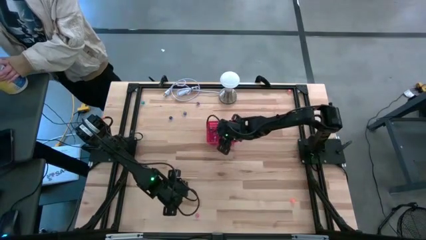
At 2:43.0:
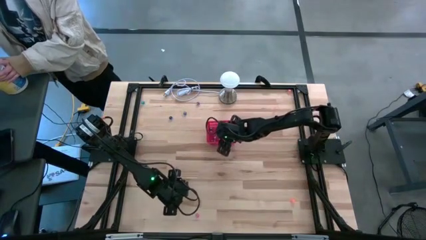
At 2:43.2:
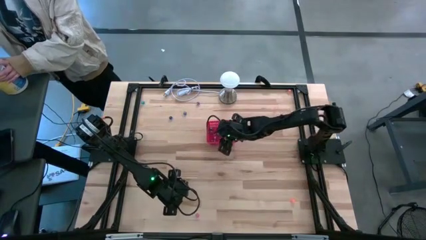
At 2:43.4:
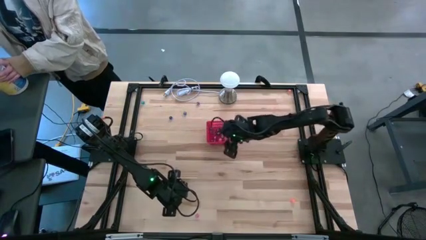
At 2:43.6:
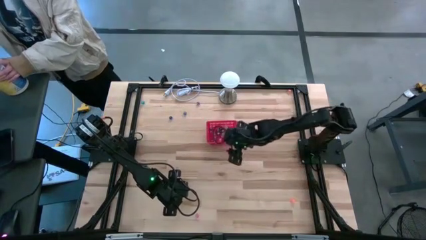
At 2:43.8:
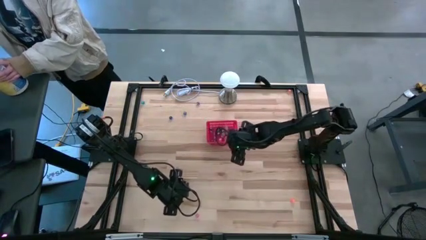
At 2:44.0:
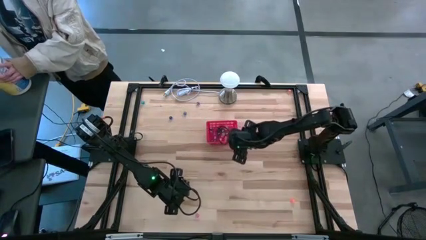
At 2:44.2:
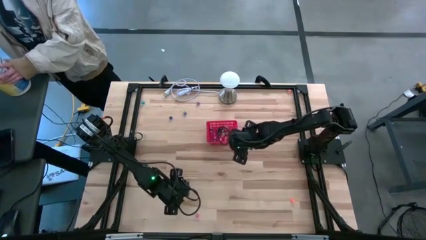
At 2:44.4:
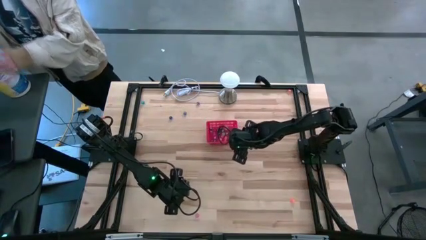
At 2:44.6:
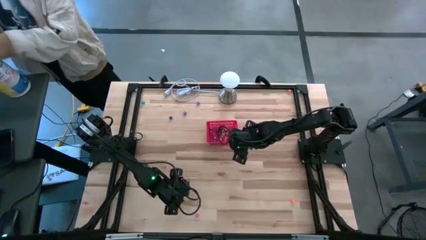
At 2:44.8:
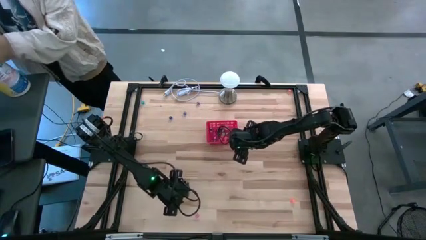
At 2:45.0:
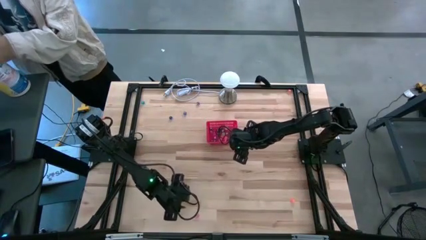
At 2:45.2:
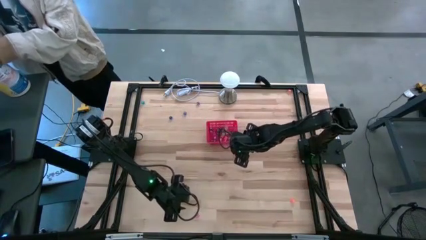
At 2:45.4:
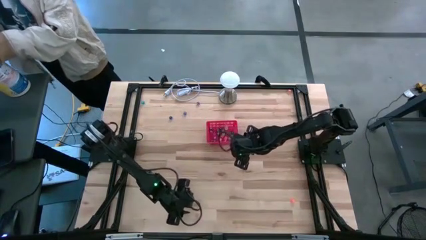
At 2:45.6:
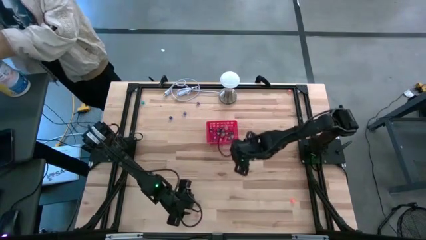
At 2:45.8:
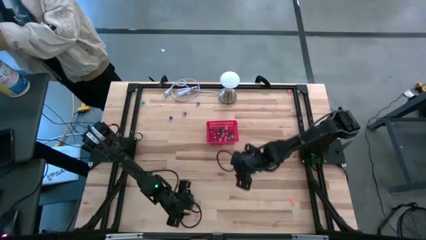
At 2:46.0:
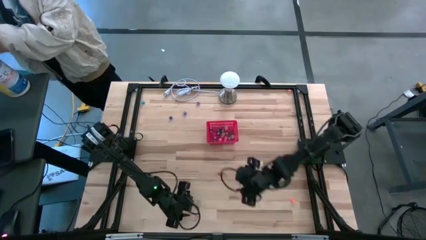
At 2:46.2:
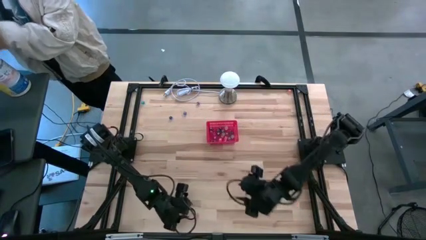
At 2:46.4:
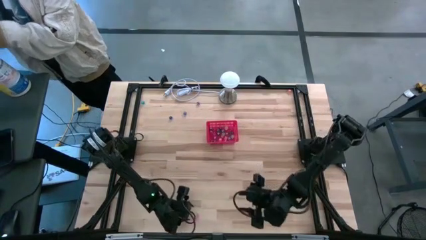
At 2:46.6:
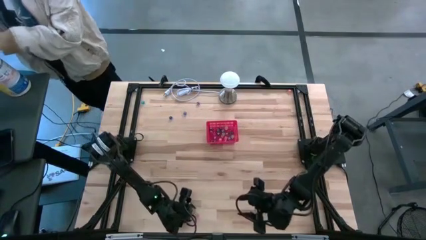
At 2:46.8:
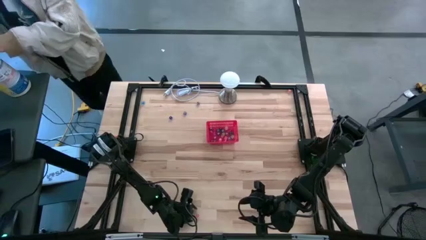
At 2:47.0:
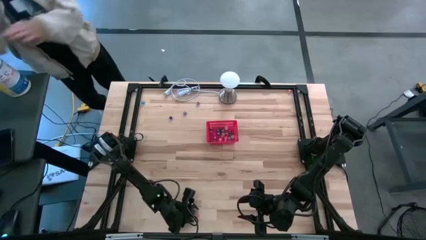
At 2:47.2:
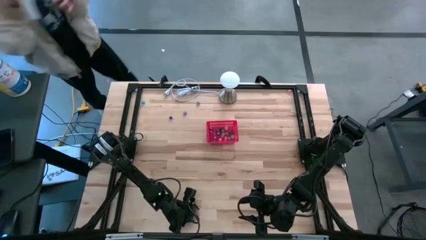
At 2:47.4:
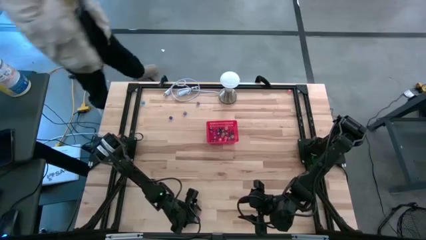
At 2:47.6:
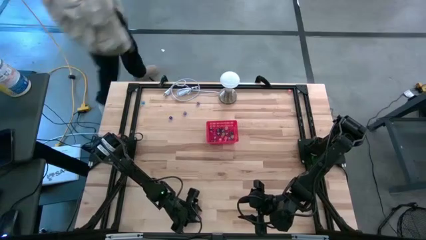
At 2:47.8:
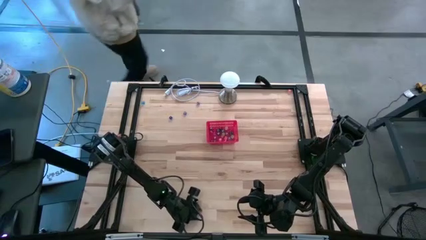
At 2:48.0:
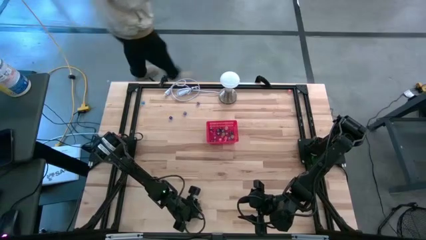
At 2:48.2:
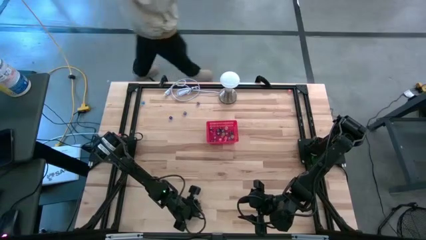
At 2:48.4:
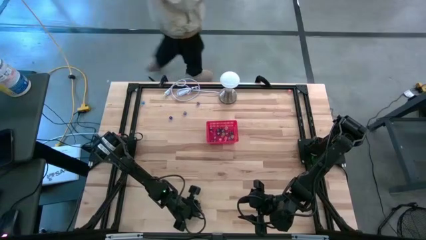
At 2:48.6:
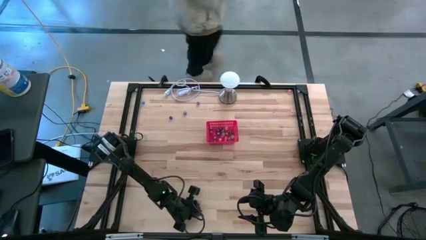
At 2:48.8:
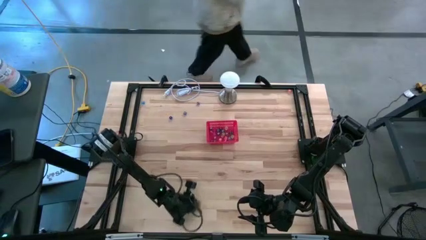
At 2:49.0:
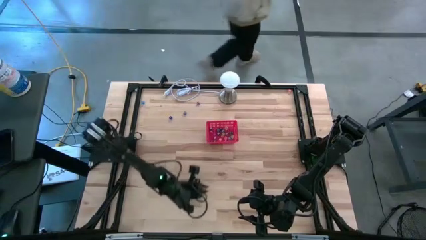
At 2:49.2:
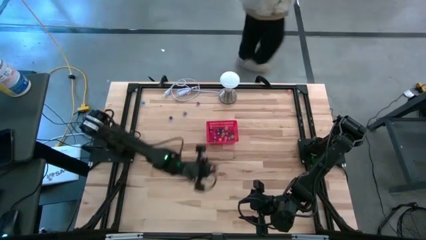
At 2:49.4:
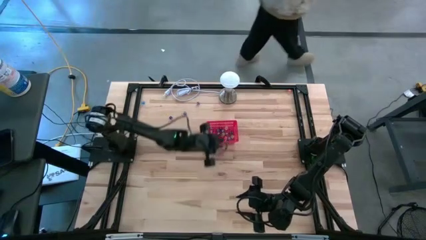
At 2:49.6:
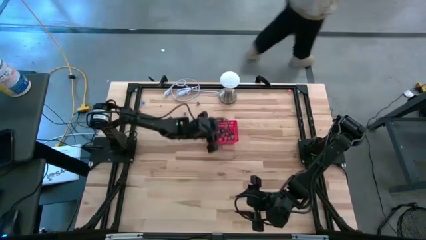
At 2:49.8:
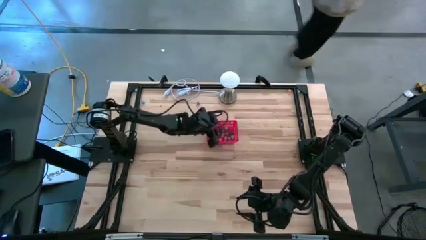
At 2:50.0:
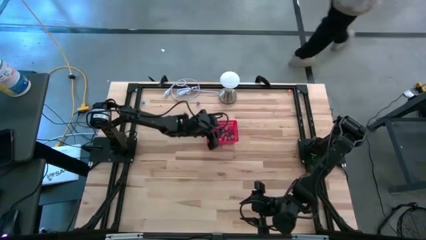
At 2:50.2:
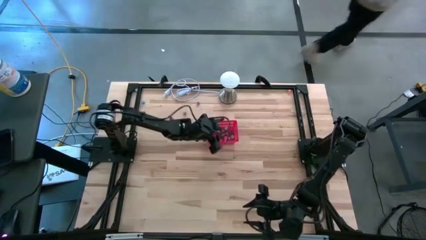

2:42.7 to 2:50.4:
Task: Pick & Place Dice
Put the pink dice into the bin

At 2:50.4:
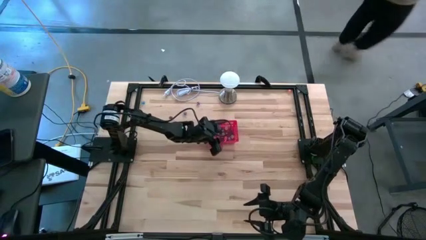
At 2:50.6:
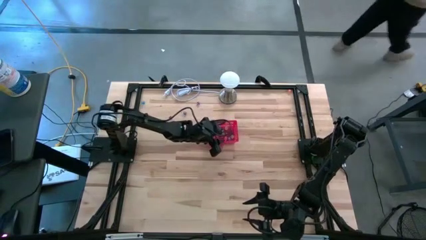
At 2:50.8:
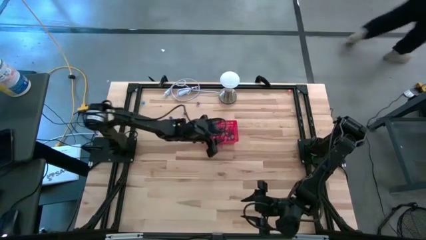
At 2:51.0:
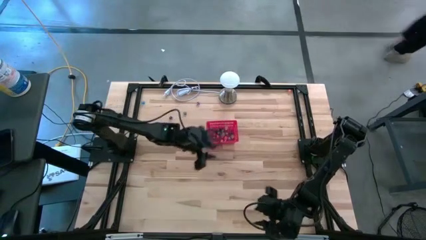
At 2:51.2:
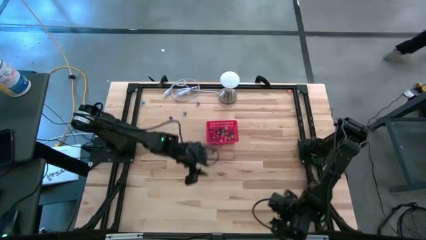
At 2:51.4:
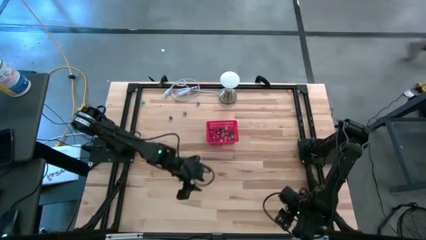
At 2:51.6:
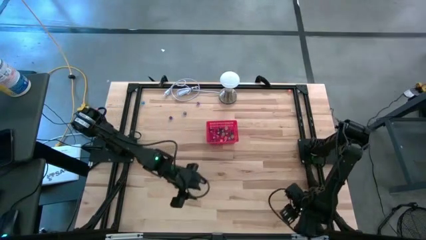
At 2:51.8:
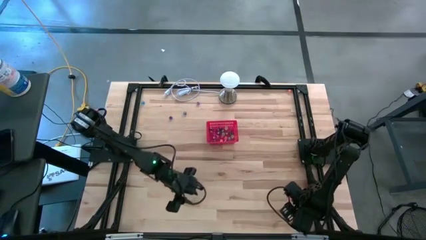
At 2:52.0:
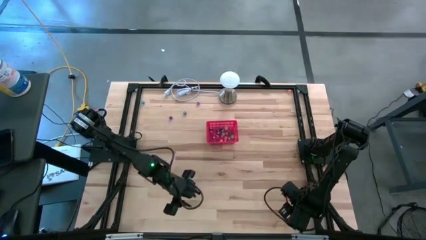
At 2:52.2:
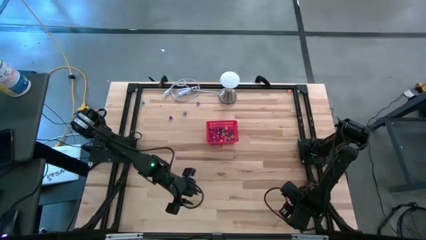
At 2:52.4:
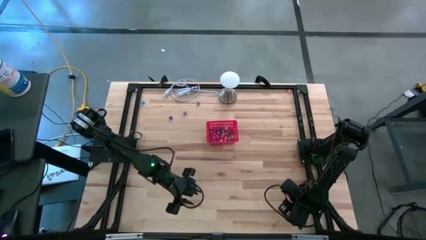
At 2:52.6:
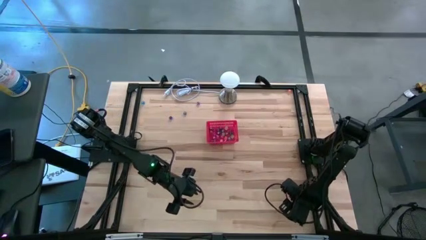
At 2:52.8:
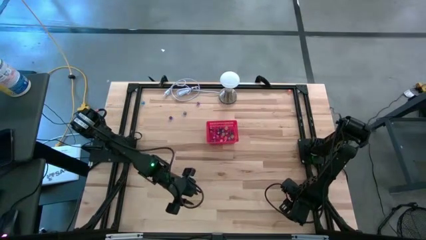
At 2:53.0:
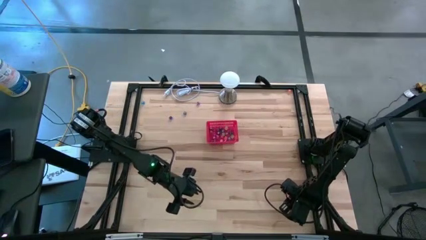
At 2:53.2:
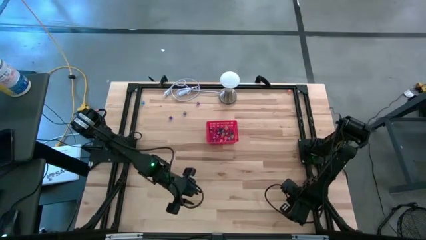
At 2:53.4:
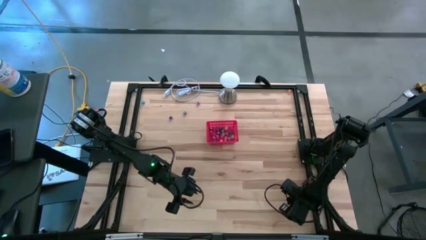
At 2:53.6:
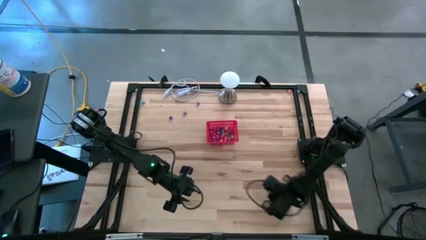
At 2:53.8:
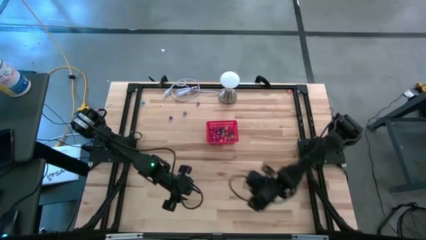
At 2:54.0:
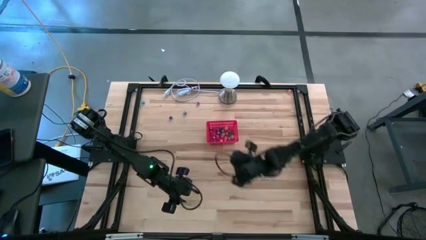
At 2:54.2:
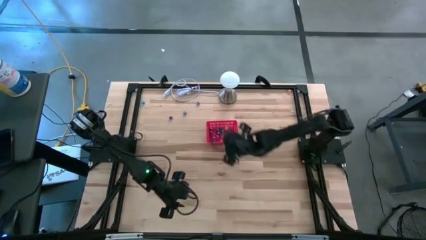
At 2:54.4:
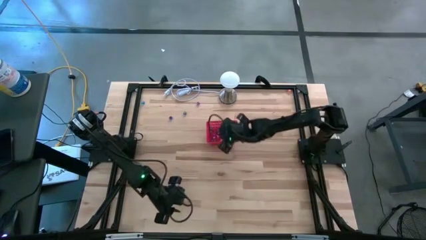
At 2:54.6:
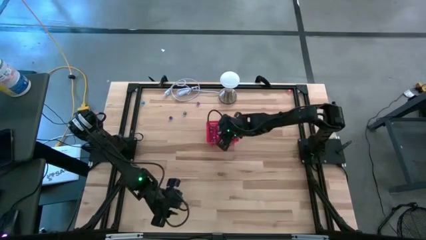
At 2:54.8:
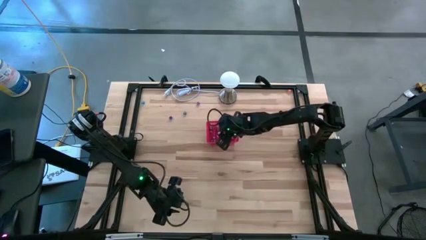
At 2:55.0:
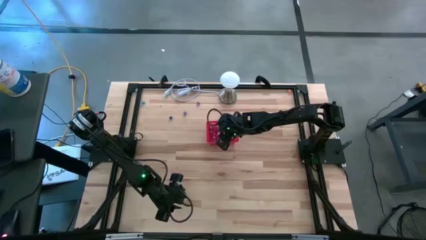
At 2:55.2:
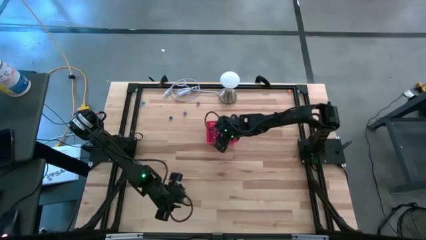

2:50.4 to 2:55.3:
Put the bottom orange dice into the bin

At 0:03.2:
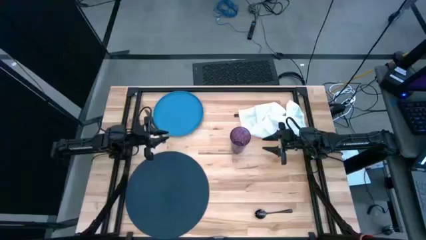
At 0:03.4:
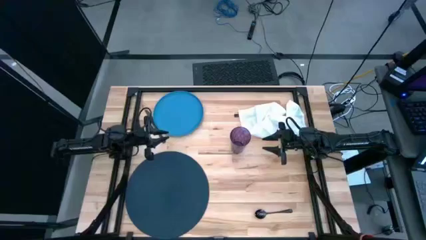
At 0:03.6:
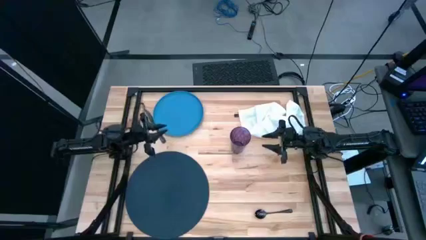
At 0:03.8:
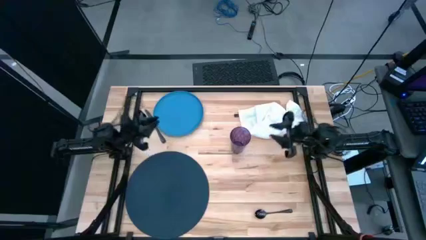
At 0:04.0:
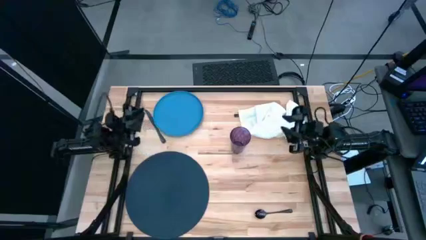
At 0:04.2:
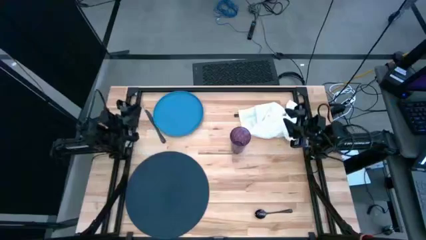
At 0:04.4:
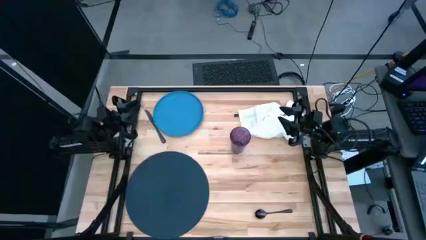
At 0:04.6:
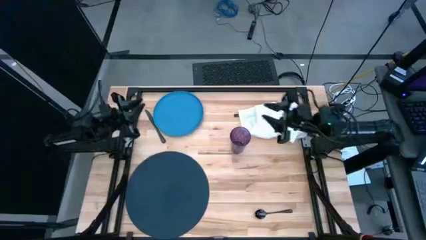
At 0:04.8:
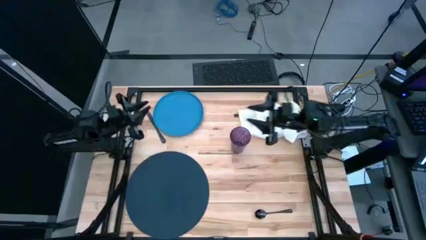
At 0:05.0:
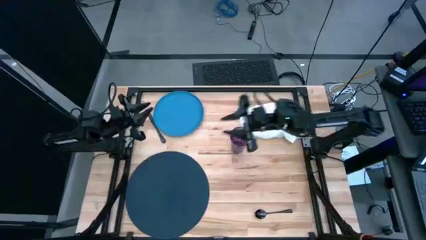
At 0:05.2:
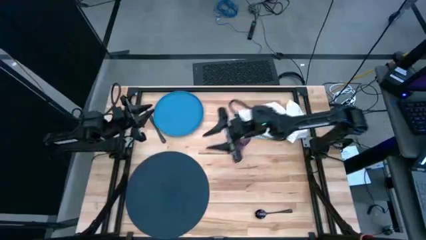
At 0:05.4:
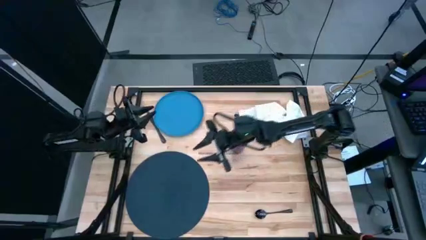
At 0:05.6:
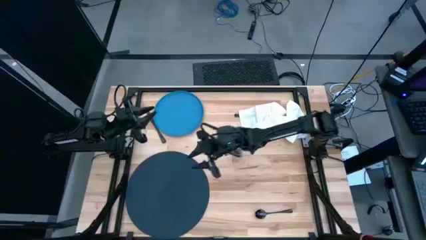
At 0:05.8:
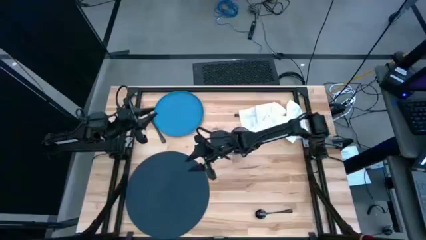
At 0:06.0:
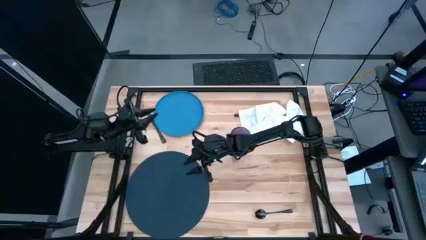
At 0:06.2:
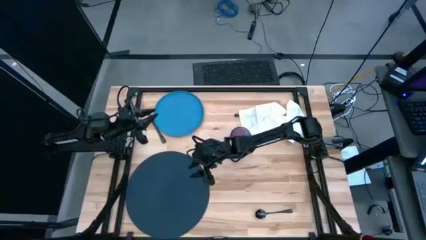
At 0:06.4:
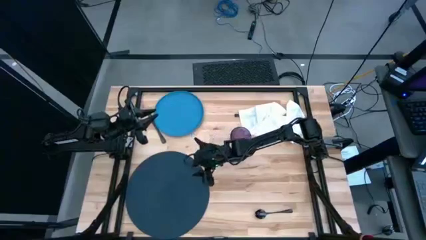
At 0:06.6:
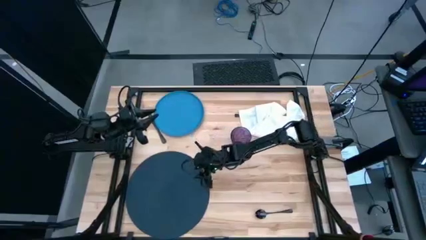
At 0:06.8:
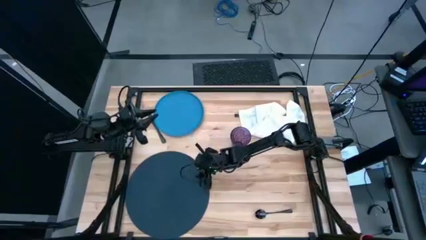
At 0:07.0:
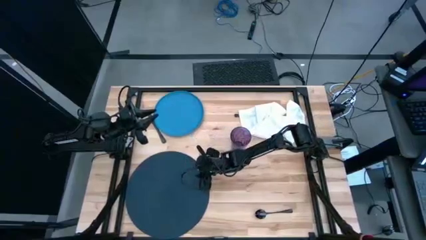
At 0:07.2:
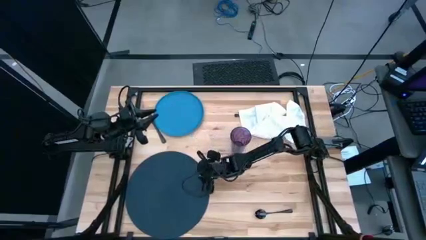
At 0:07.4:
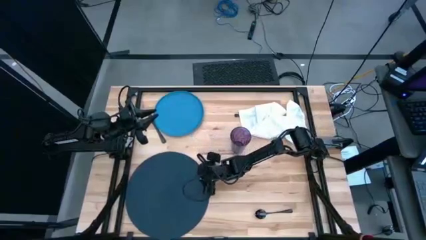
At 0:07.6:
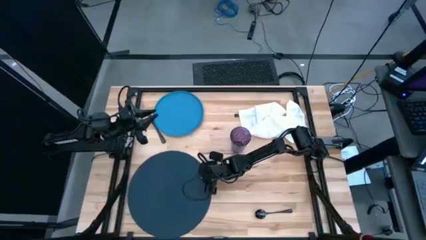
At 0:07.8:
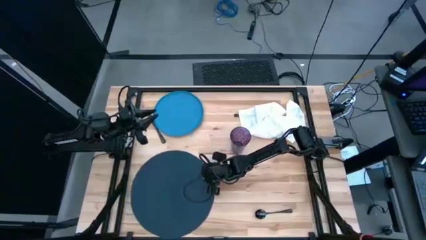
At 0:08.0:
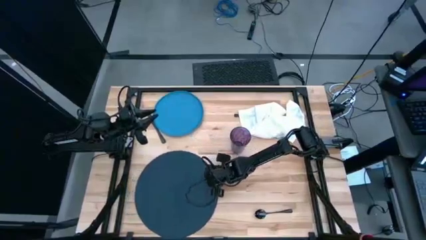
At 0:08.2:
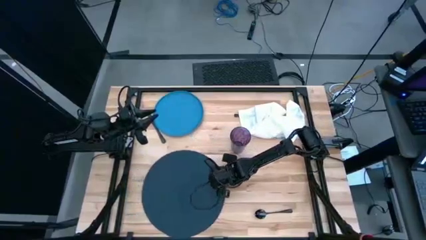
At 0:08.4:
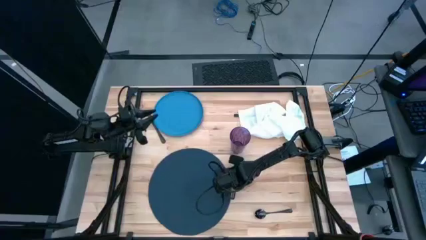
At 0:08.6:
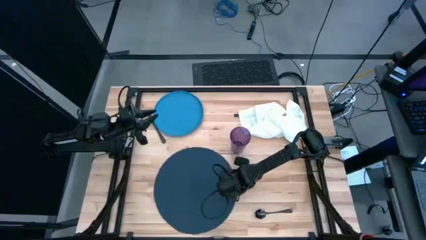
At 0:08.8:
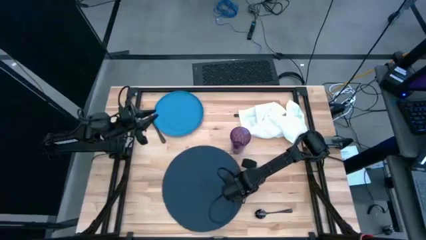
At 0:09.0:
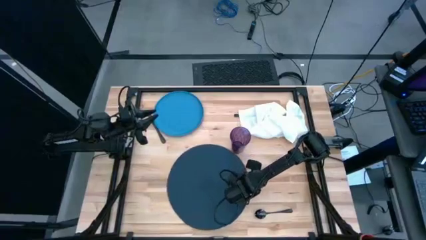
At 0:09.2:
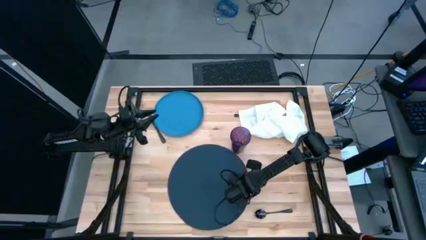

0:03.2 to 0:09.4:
Task: Set table place
Move the dark blue placemat to the bottom center of the table
